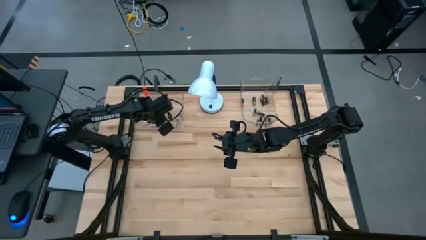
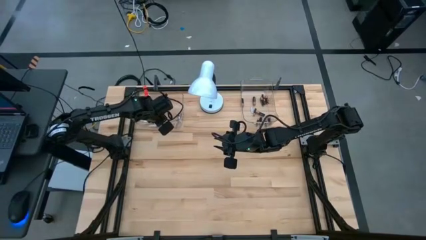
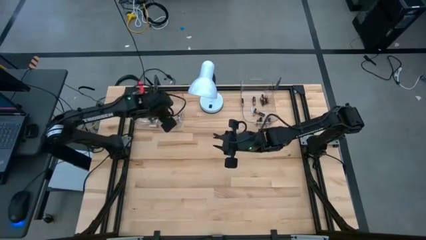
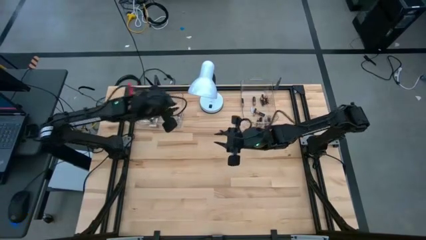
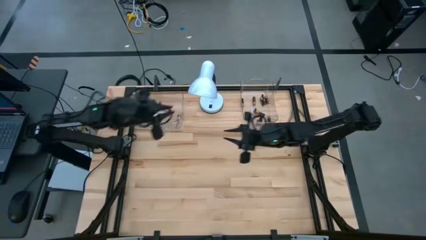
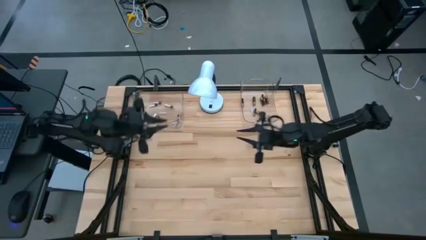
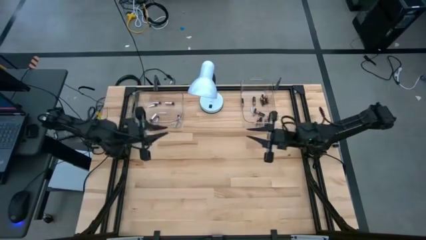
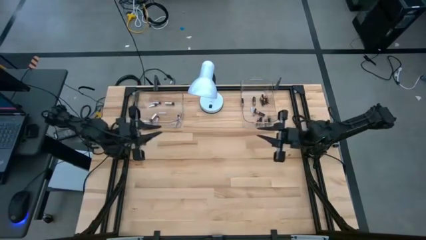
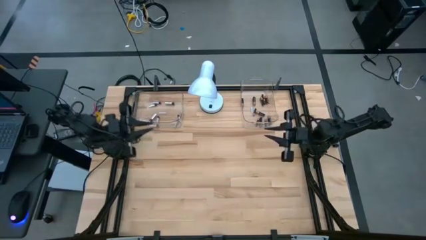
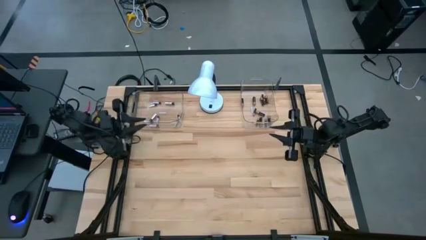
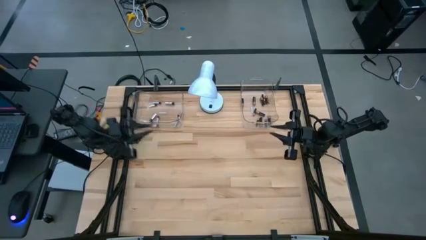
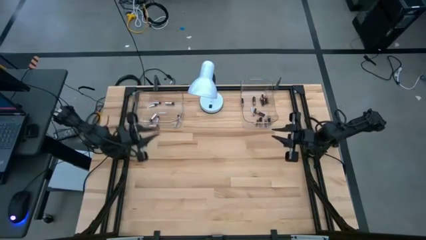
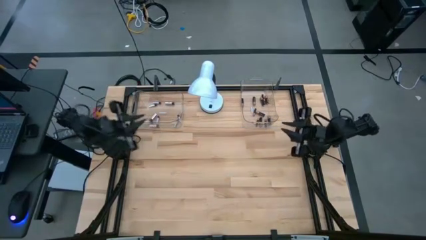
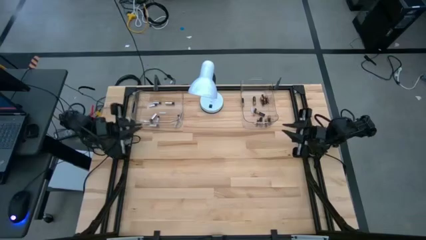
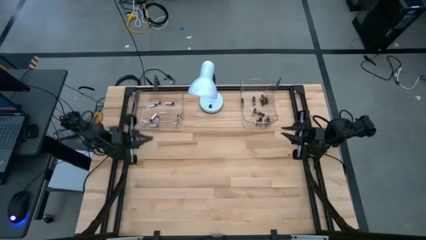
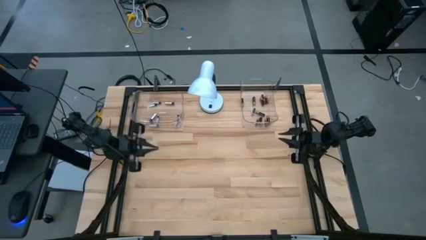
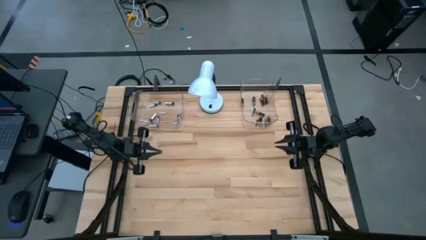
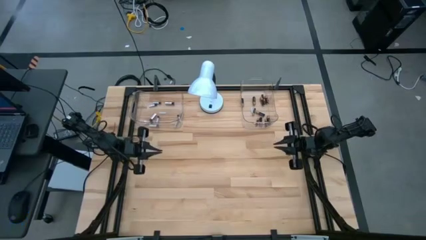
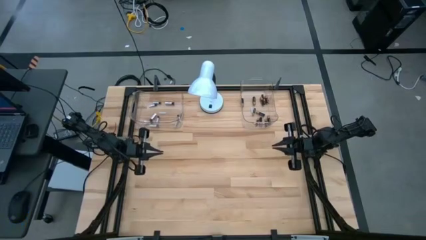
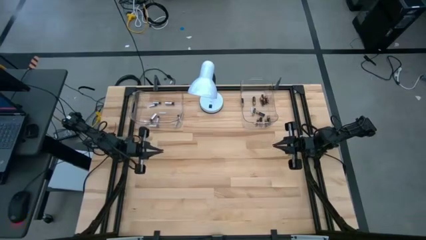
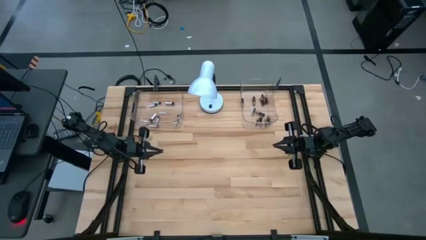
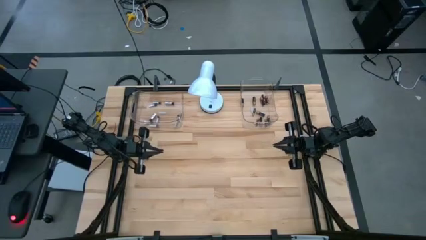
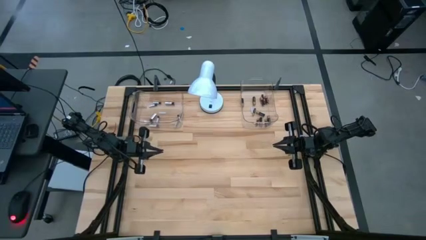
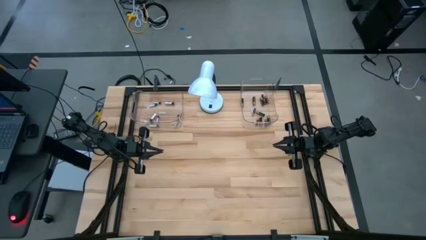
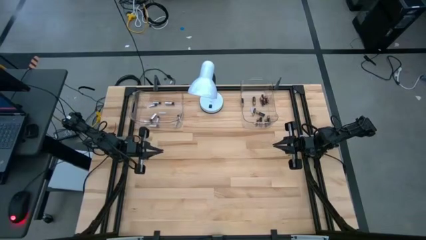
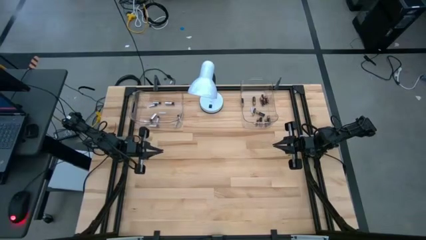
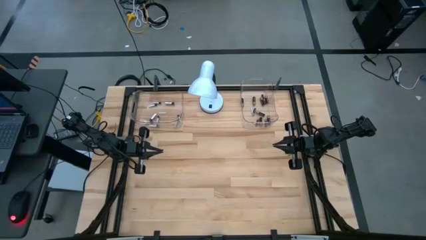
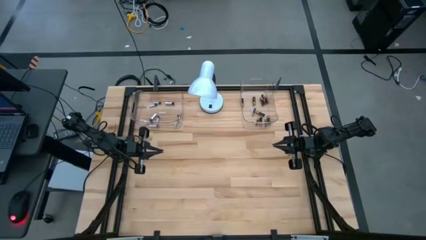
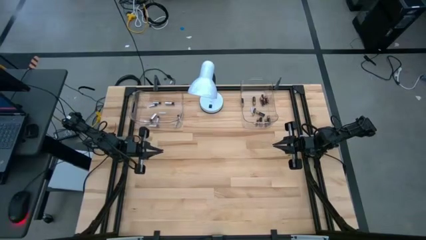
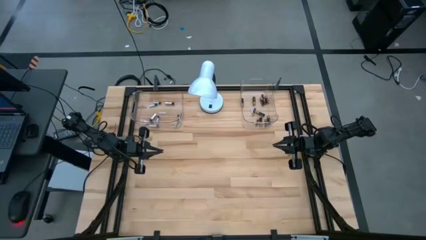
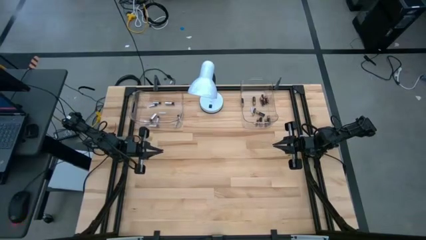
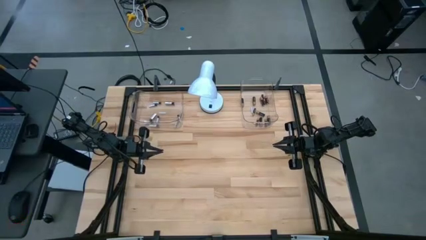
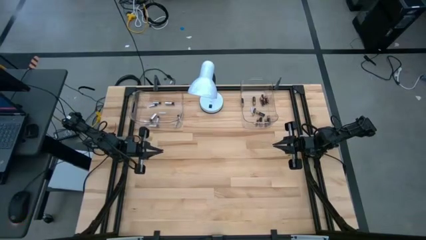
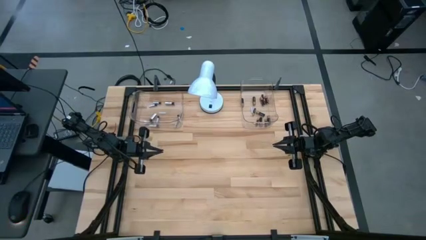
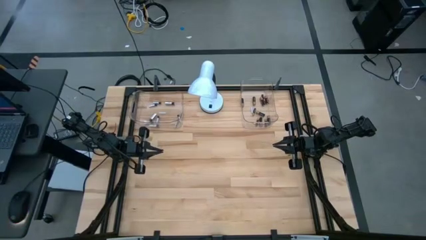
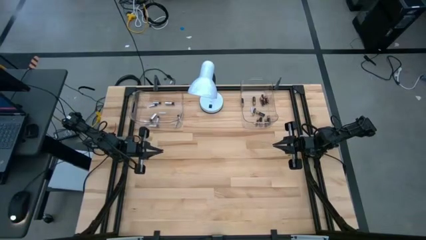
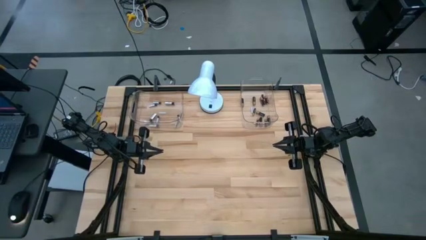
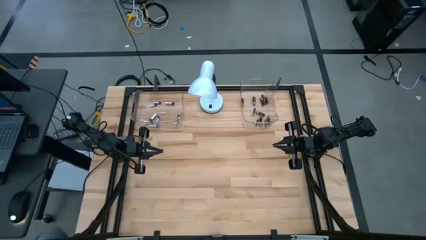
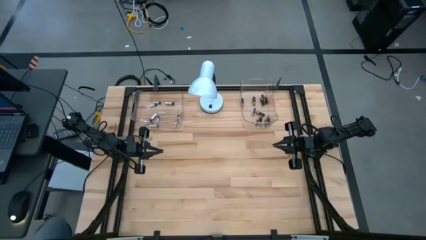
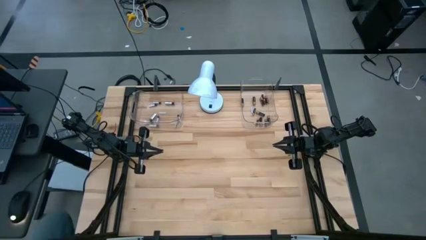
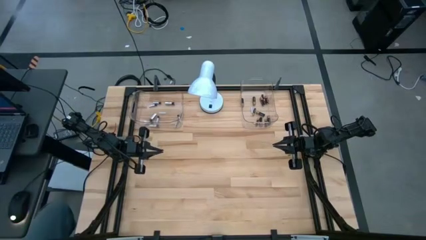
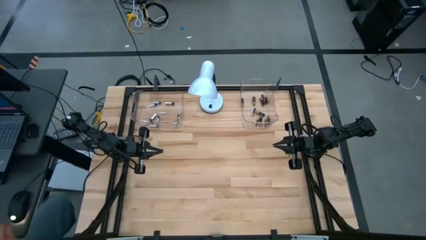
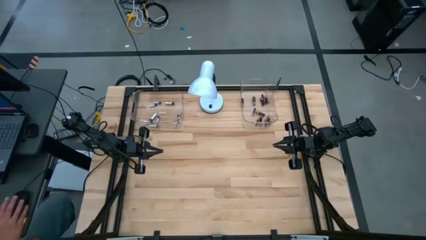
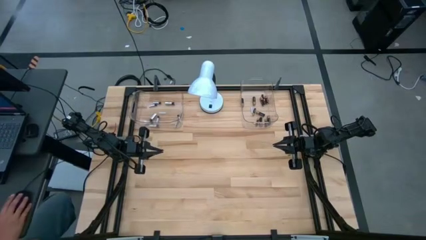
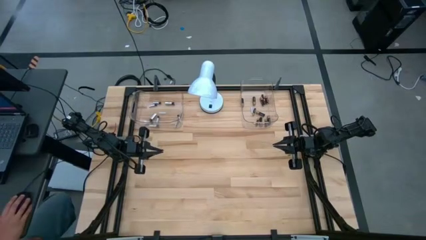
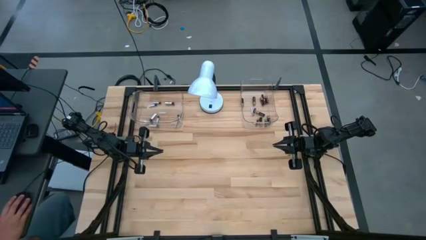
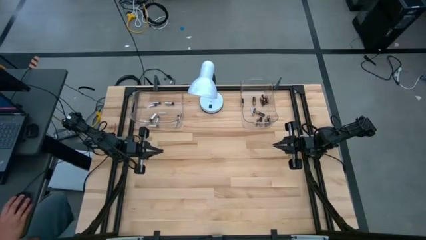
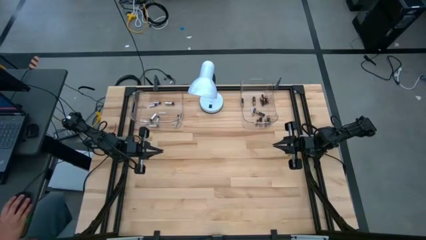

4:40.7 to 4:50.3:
Task: Sort batteries
Return to Home Position

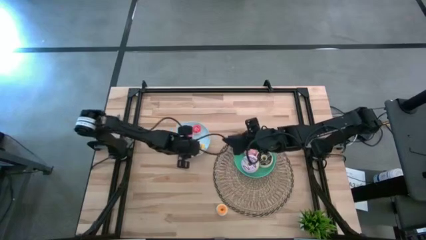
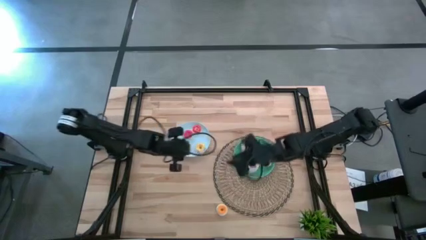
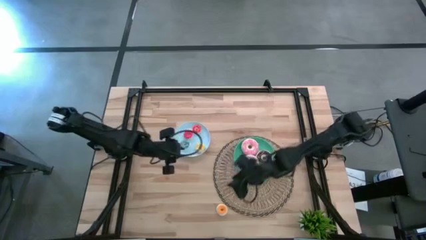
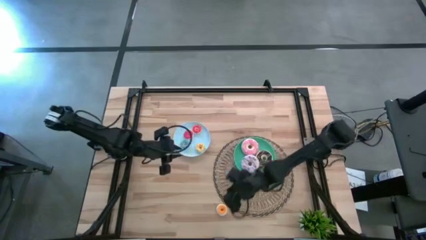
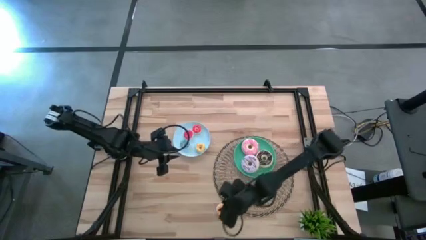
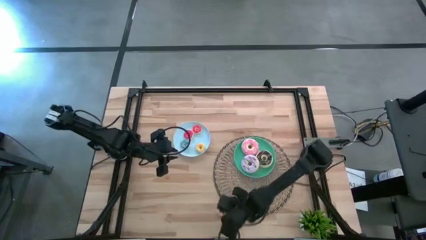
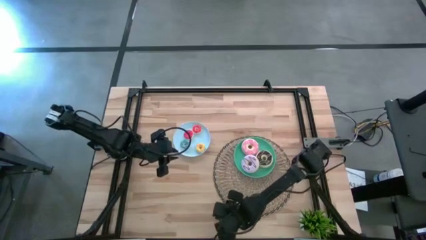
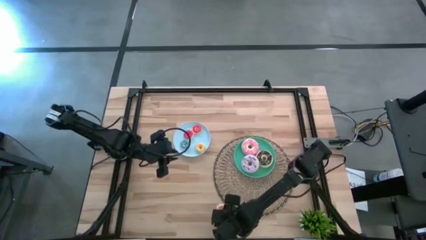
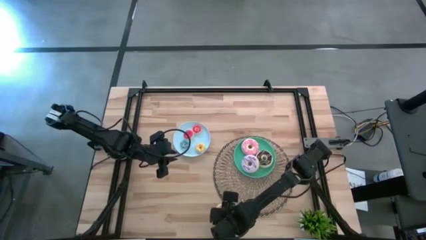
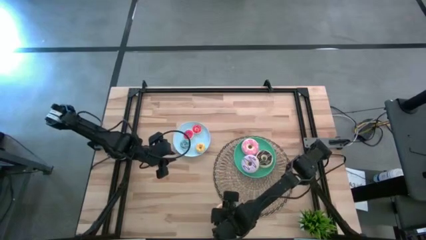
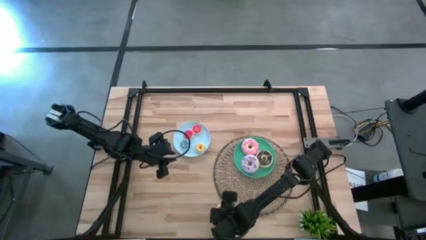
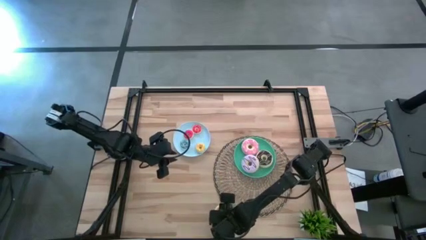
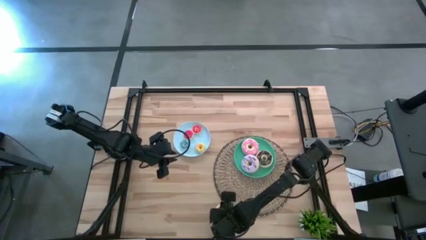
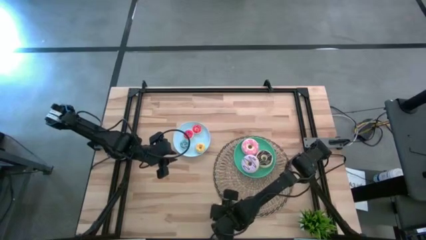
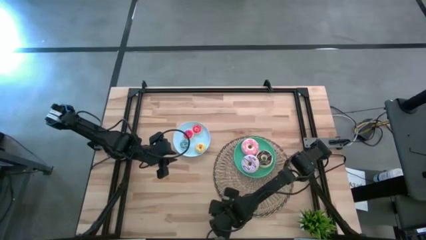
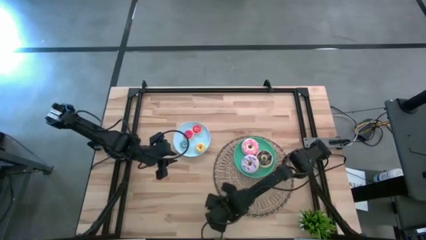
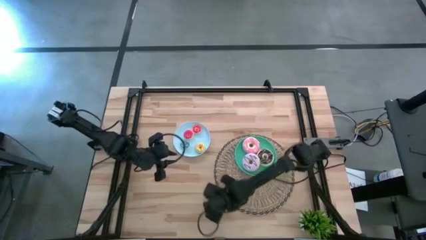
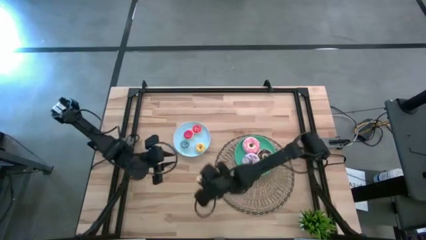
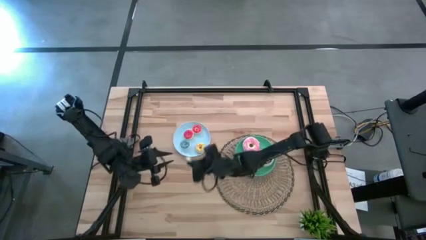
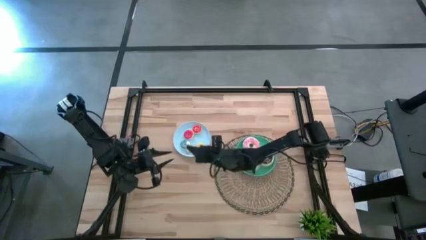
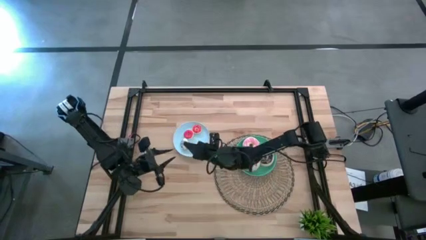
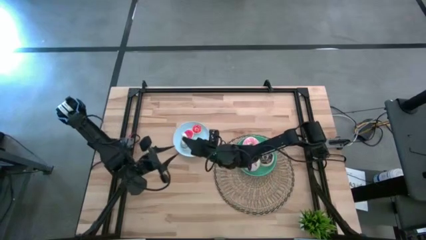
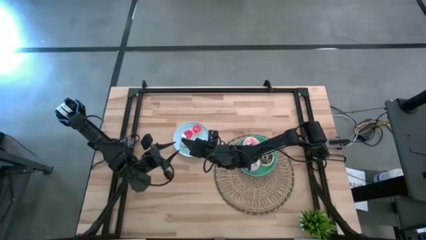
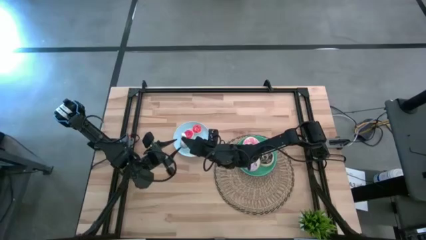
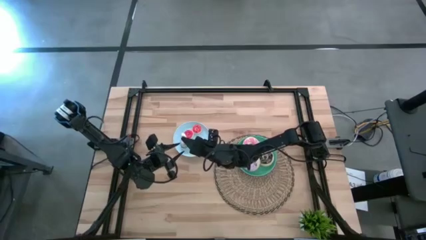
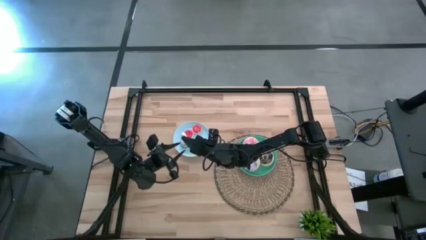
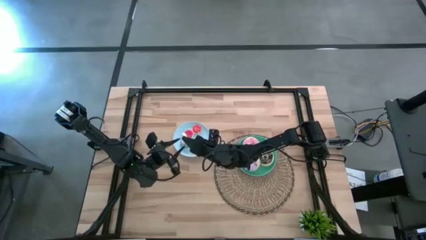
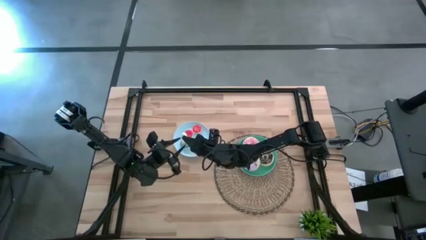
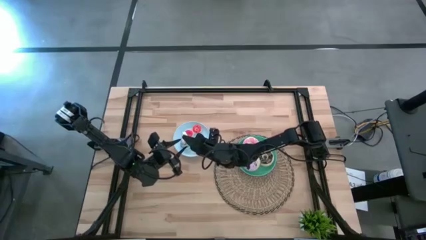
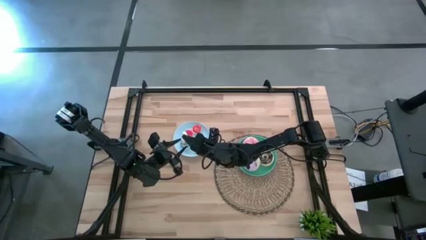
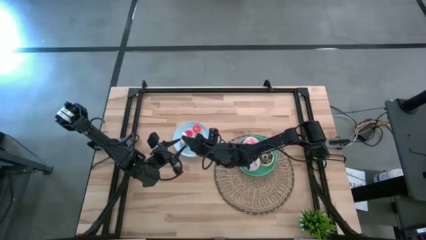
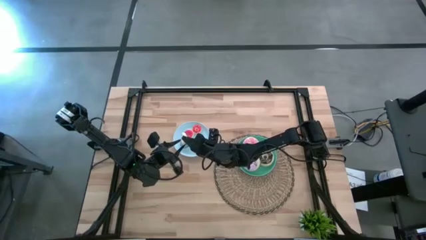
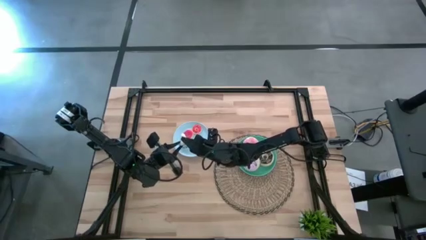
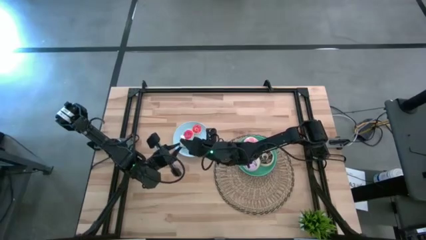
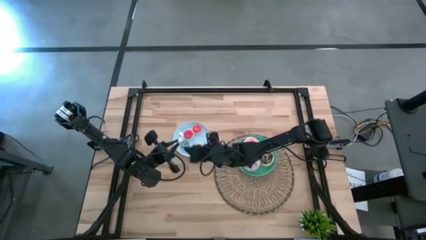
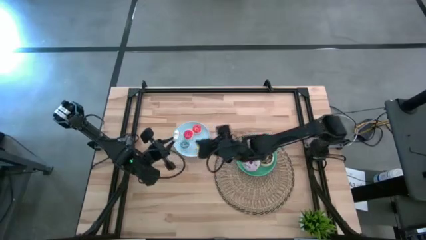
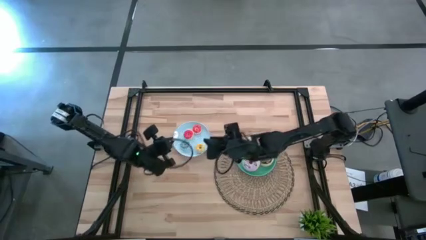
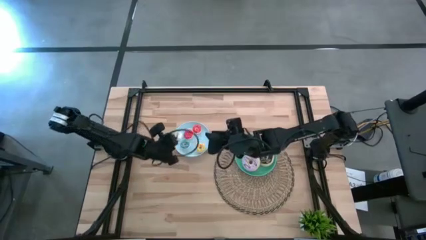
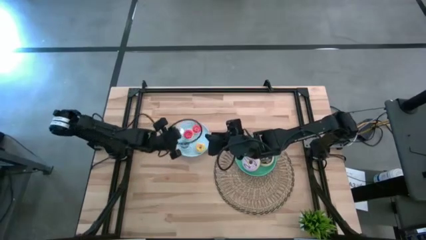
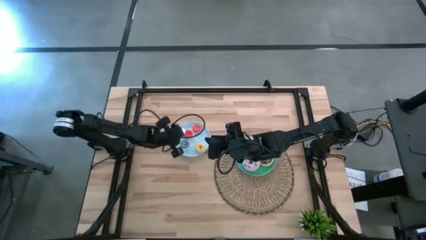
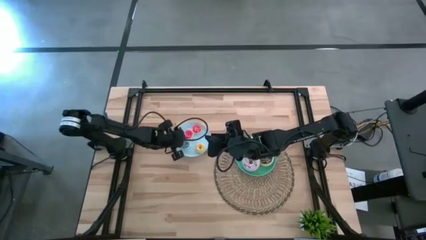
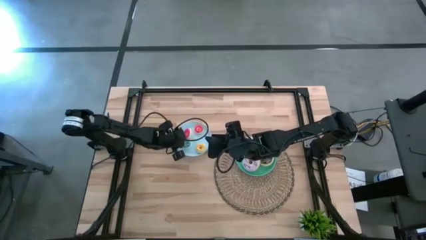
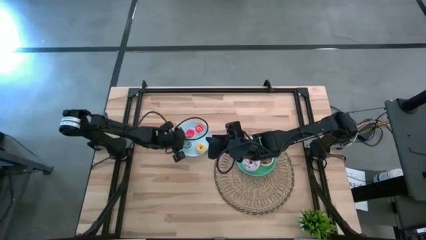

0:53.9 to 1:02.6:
Task: Pick & Place donuts
Put the small white donut onto the blue plate
